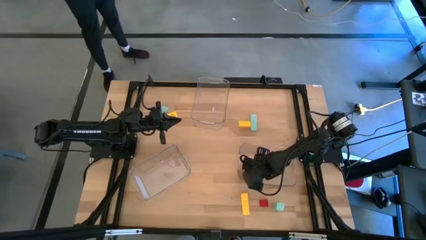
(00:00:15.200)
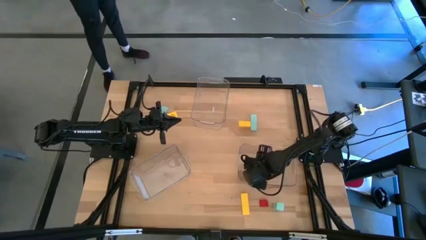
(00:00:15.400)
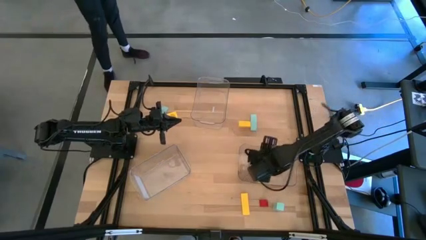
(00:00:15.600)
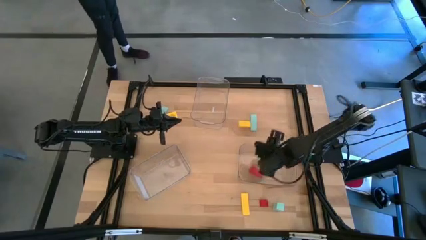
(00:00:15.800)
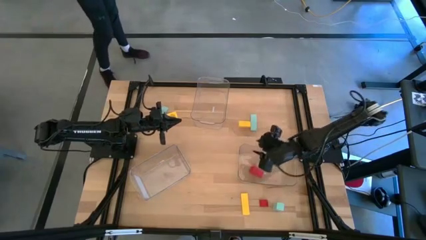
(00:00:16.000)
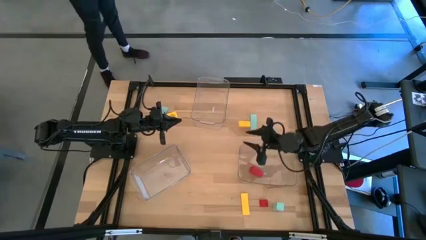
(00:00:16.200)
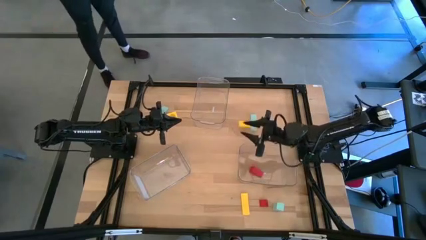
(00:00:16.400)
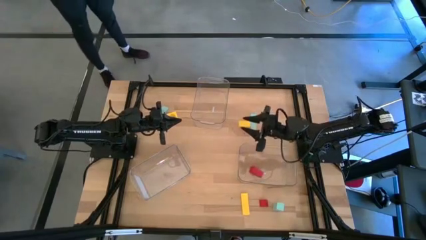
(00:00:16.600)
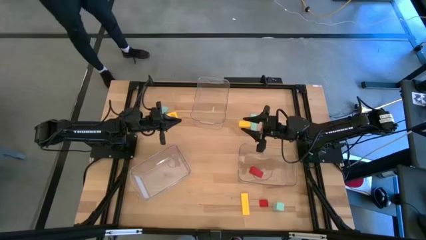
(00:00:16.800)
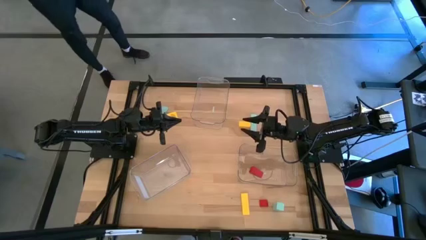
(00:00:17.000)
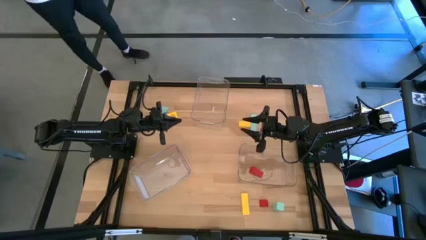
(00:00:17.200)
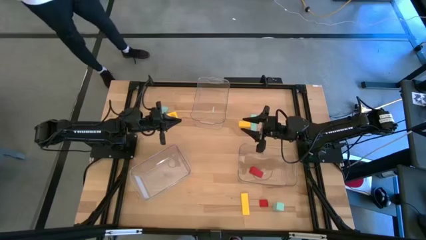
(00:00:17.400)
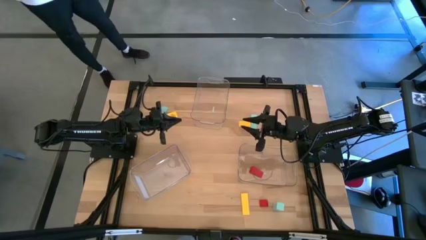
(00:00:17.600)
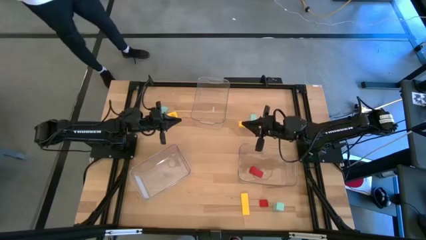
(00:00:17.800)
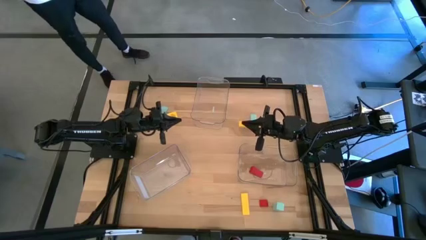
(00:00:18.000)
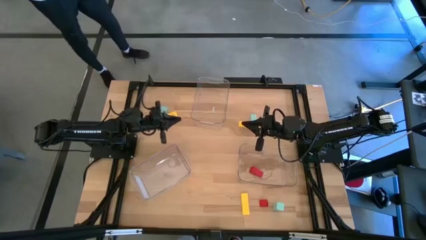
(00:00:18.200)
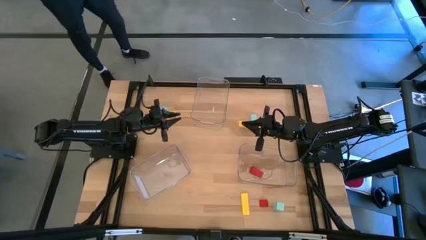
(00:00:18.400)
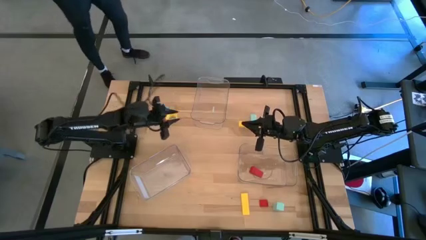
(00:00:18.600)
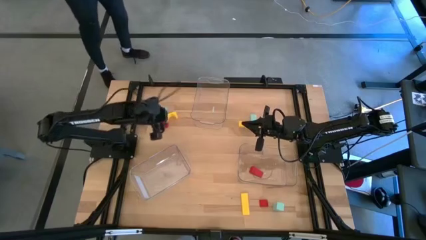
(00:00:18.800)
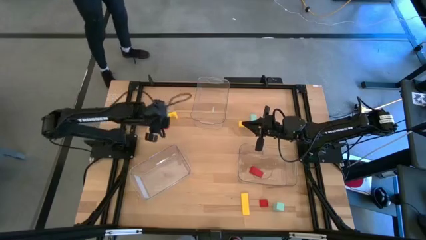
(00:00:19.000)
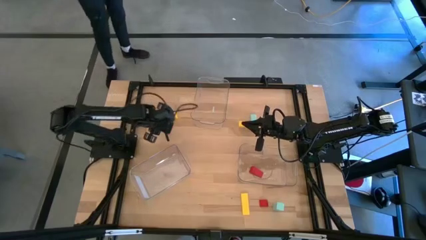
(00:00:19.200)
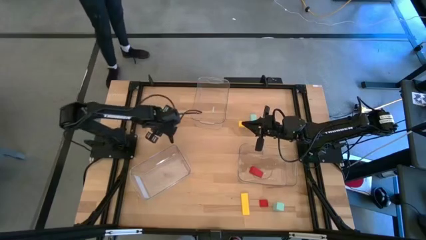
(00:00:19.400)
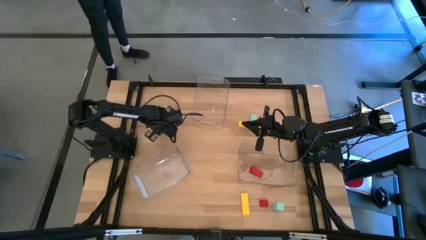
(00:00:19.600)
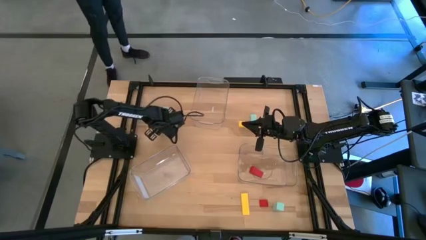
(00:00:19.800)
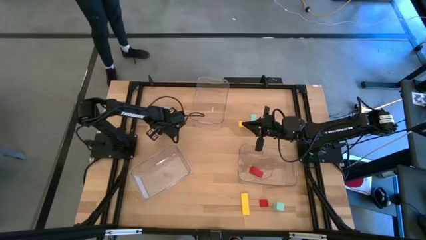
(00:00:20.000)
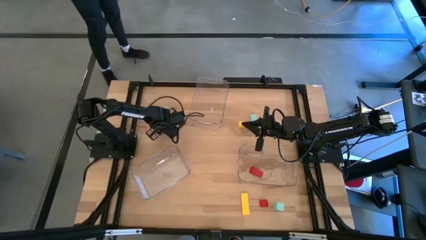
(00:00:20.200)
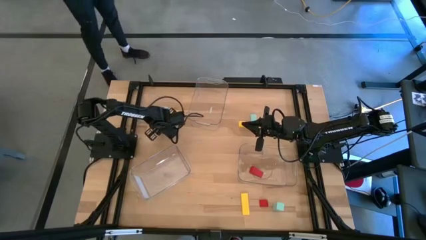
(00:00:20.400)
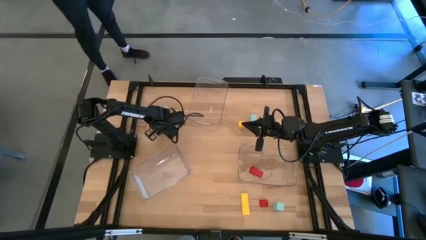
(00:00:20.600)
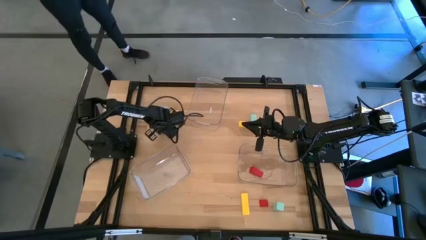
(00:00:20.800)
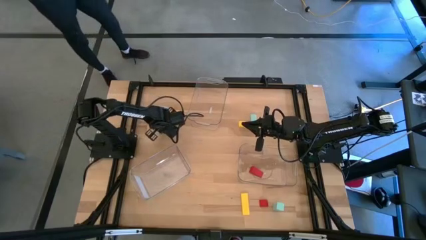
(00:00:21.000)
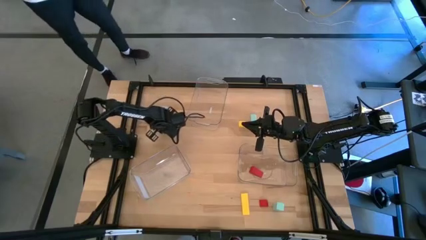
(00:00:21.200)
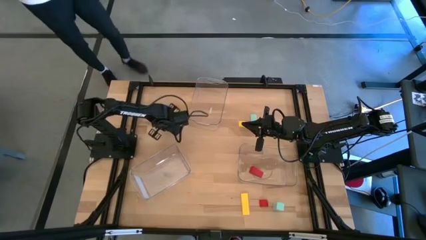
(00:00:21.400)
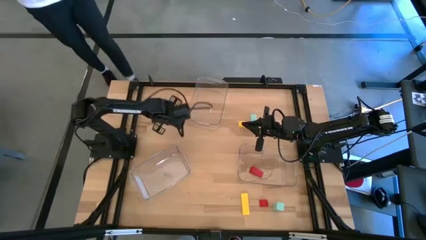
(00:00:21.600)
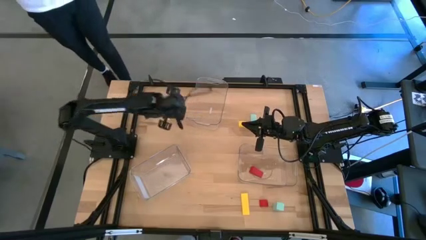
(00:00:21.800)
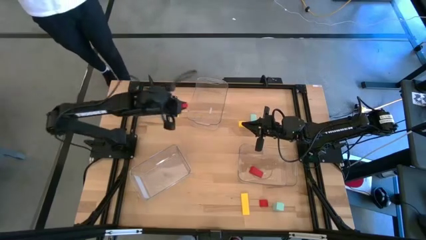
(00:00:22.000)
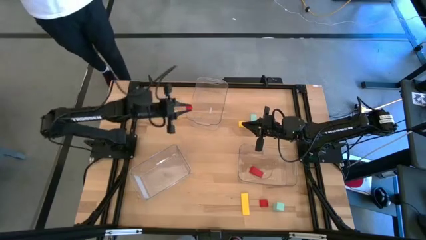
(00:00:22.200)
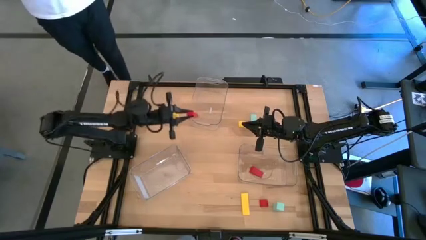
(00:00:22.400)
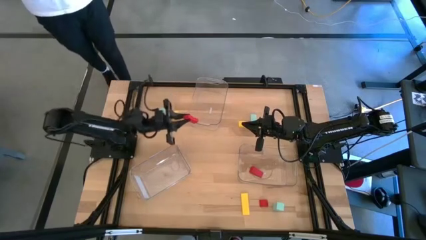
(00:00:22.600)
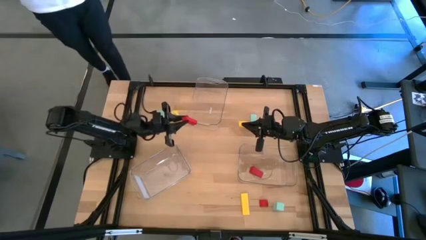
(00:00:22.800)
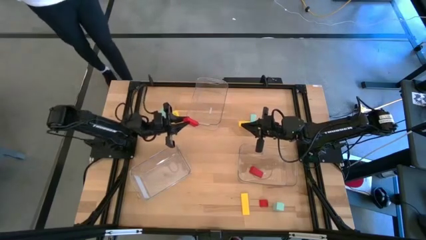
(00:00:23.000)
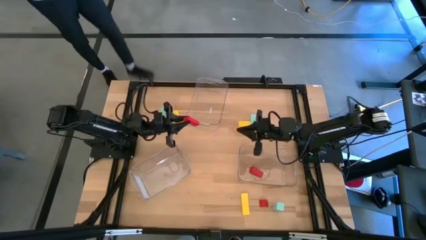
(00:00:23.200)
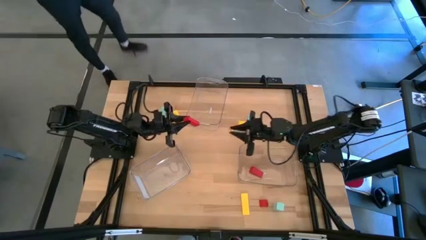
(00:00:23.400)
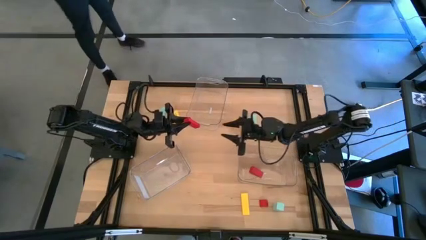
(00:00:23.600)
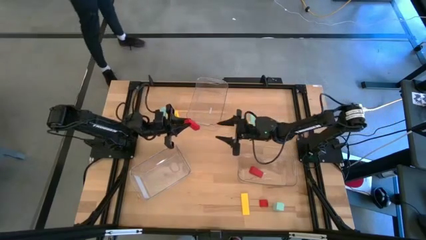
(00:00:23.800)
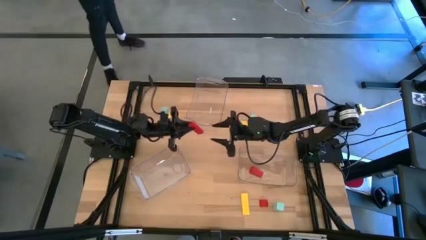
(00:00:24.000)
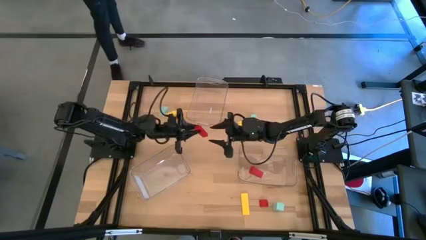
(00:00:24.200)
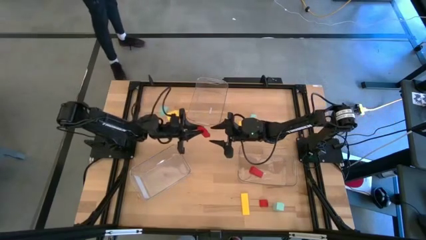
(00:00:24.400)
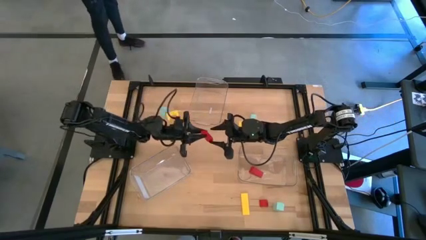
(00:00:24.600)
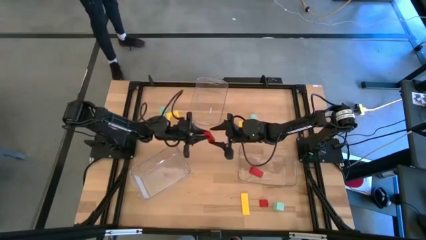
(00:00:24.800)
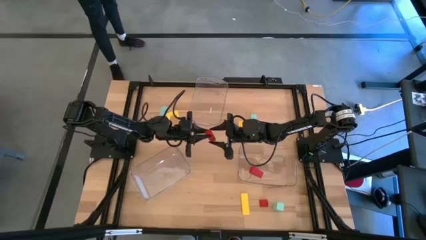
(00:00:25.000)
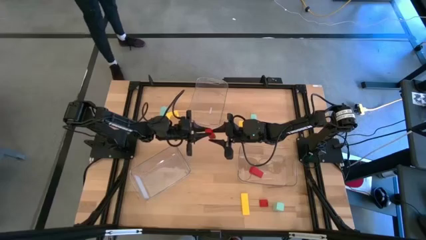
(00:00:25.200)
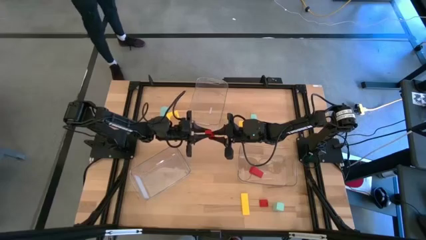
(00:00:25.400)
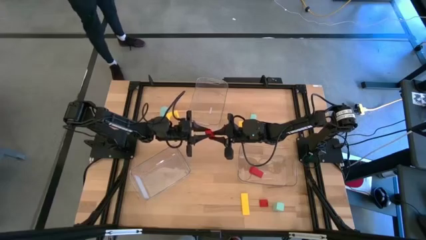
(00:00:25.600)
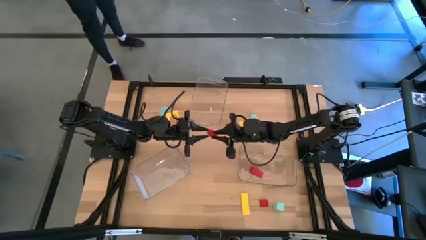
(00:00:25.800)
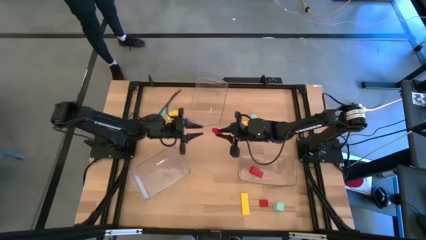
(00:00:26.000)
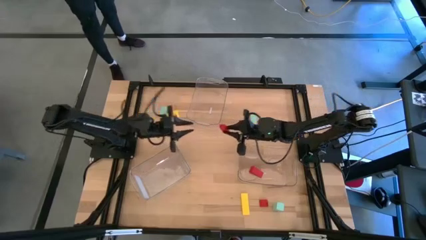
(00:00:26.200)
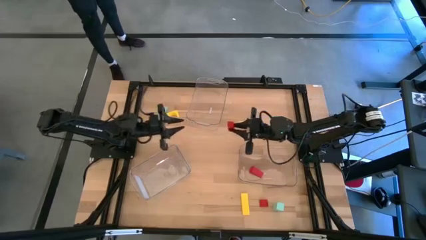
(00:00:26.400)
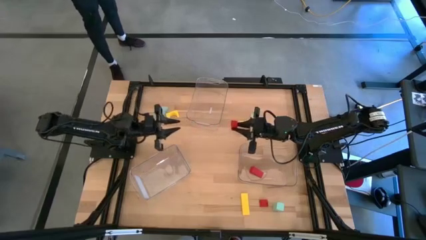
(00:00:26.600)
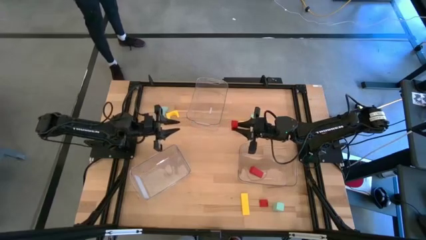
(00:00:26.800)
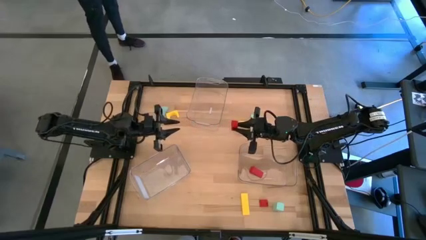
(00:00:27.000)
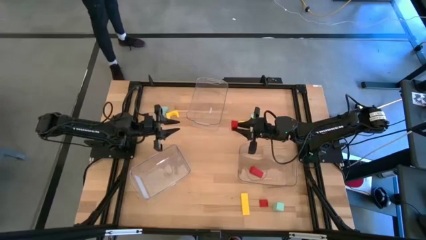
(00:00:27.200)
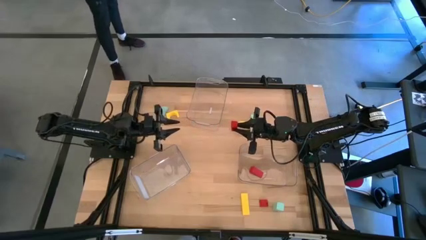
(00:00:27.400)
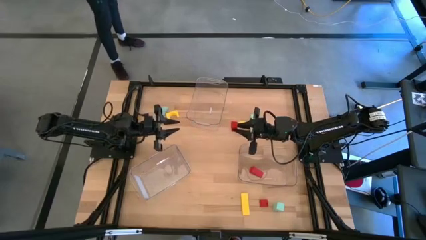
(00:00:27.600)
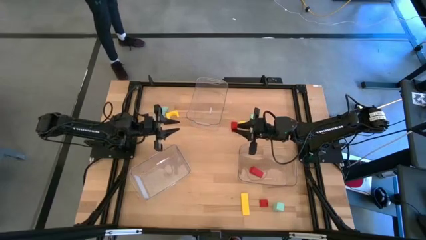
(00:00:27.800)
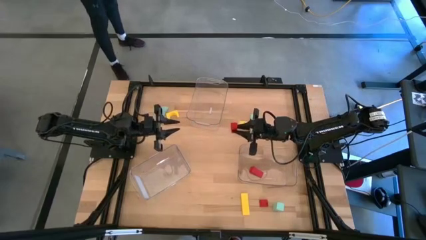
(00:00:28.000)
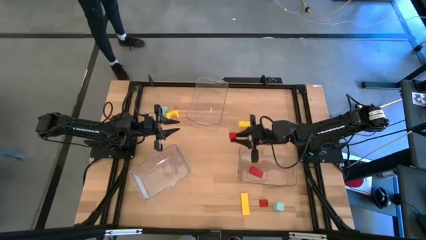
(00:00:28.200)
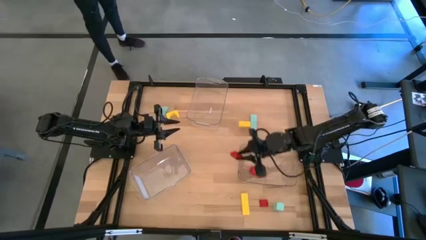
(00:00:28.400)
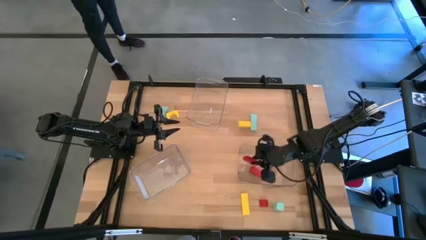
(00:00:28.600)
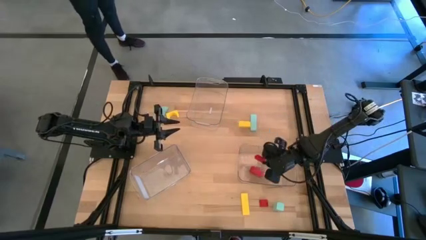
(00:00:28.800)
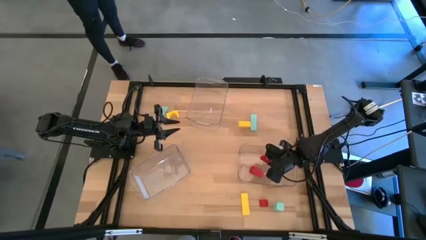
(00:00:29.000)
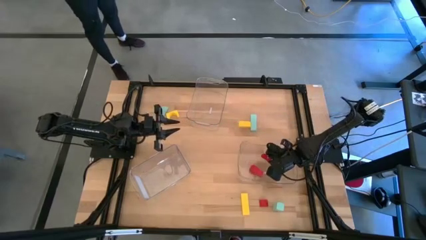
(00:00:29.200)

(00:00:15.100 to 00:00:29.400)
Task: Sort & place blocks by color
Put the top red block into the bottom right transparent bin
